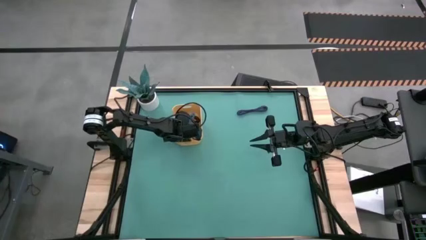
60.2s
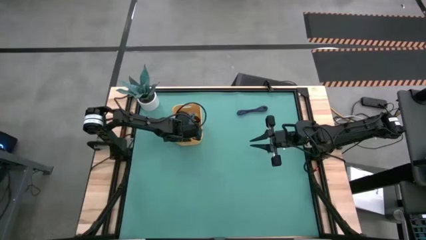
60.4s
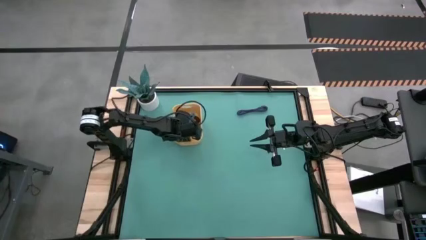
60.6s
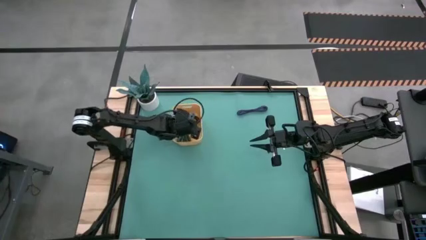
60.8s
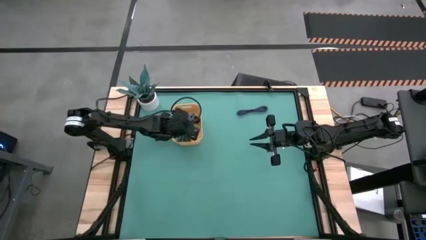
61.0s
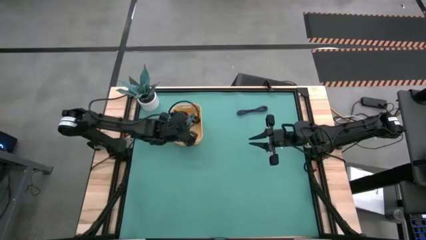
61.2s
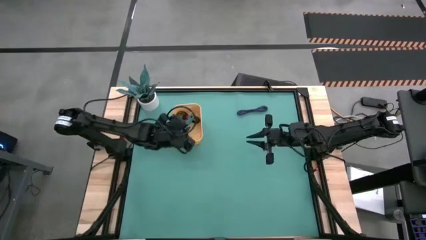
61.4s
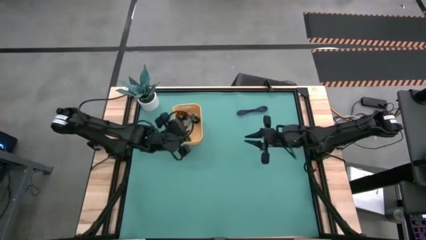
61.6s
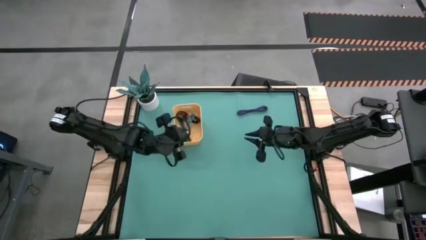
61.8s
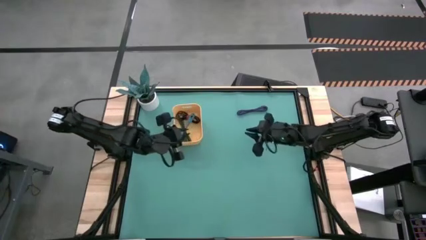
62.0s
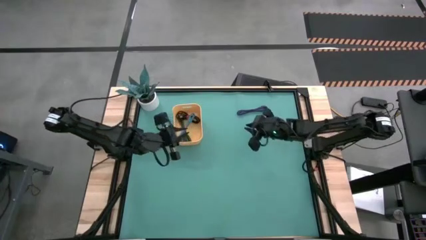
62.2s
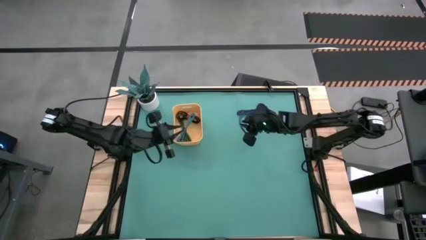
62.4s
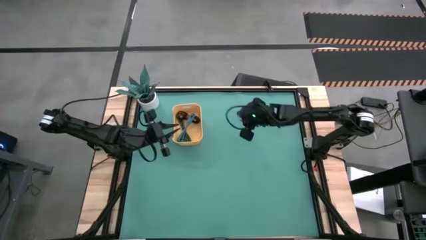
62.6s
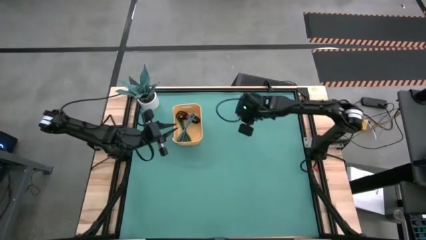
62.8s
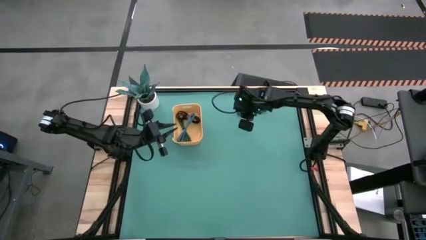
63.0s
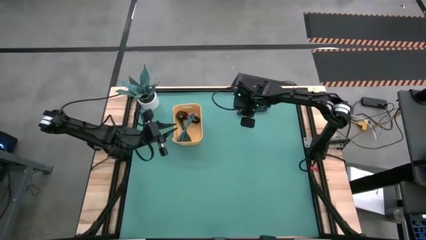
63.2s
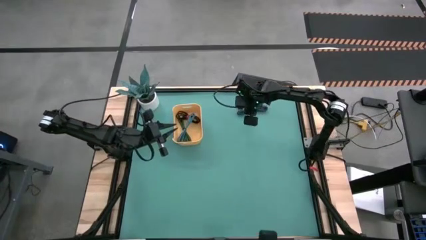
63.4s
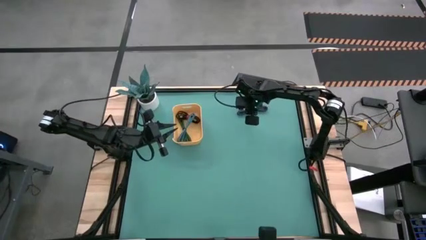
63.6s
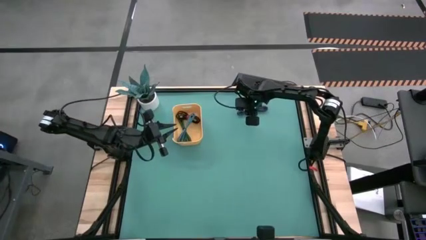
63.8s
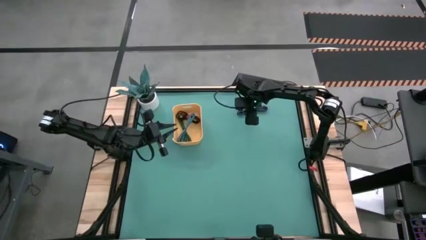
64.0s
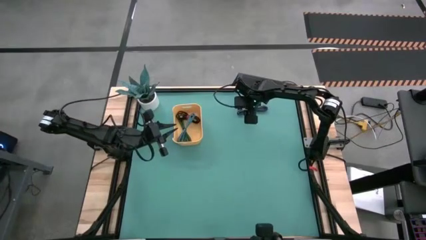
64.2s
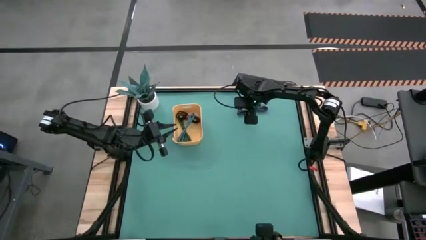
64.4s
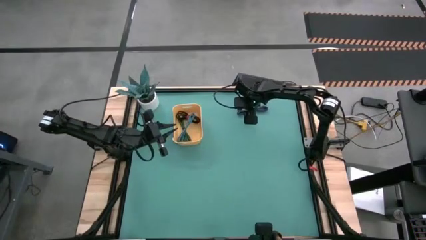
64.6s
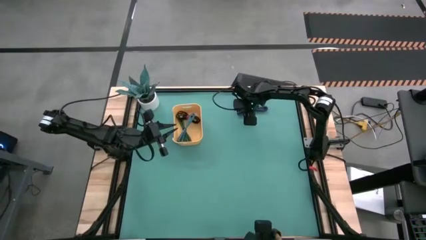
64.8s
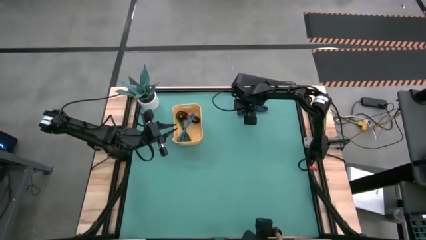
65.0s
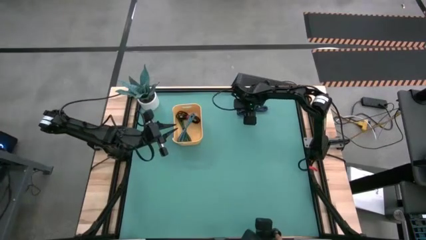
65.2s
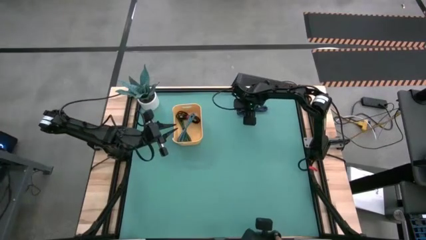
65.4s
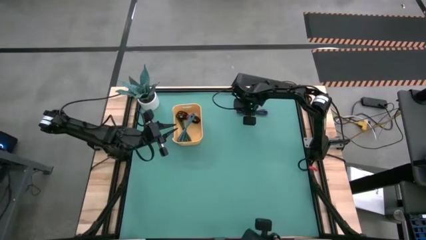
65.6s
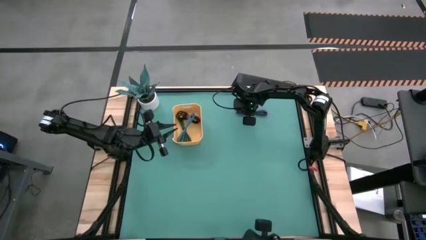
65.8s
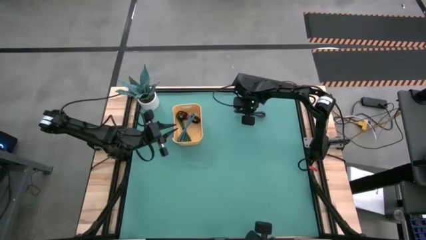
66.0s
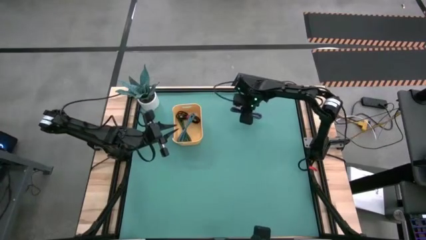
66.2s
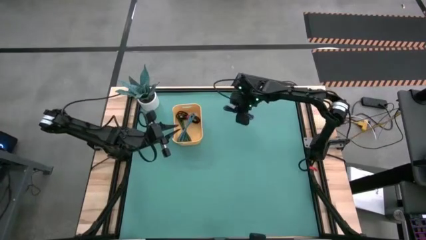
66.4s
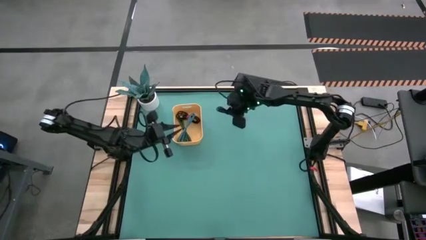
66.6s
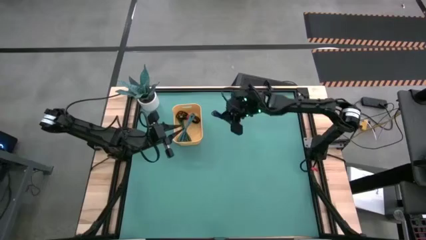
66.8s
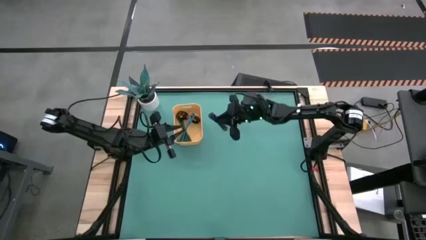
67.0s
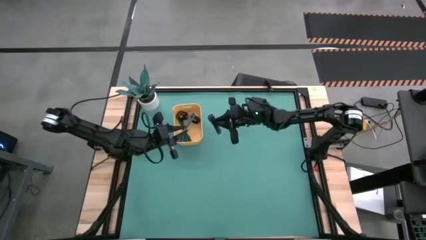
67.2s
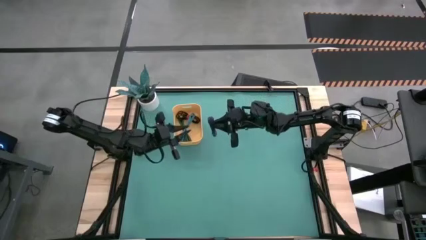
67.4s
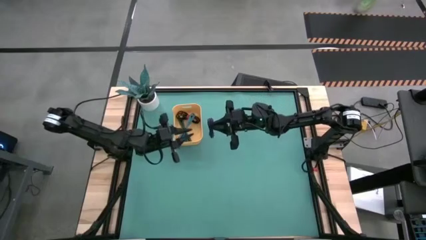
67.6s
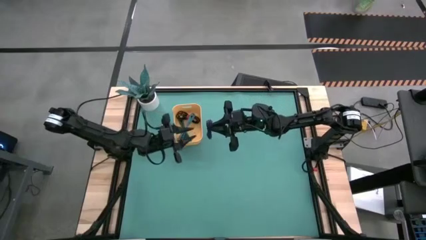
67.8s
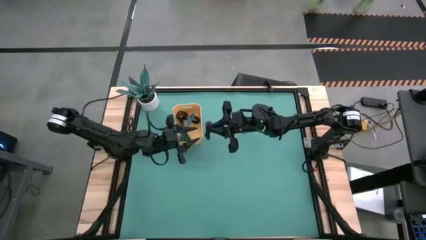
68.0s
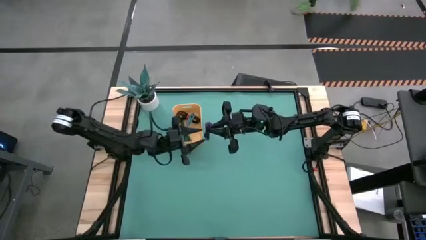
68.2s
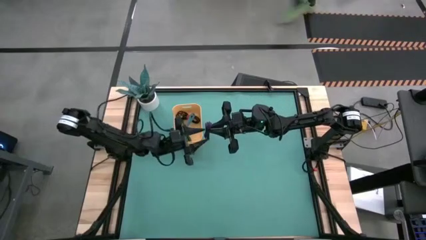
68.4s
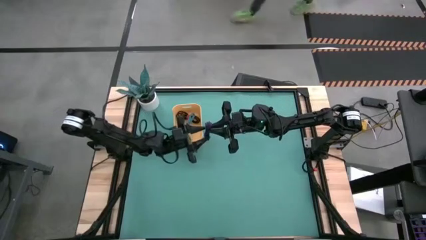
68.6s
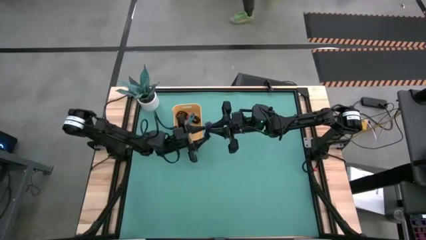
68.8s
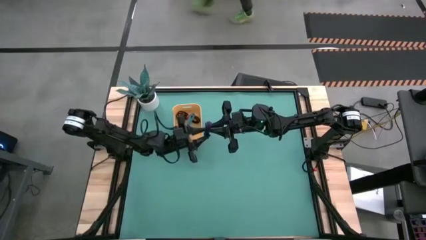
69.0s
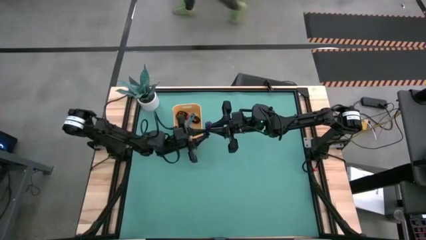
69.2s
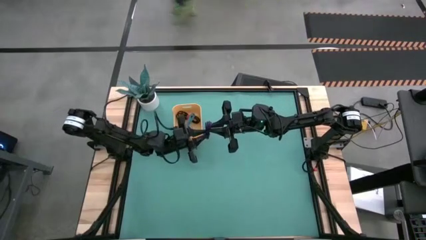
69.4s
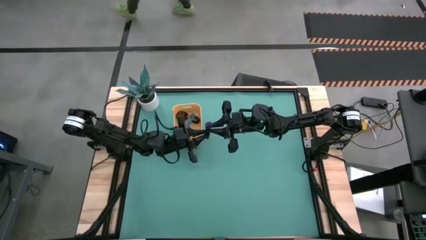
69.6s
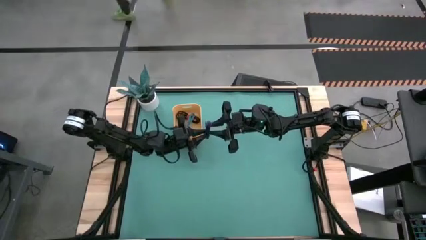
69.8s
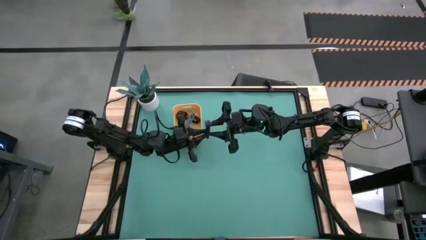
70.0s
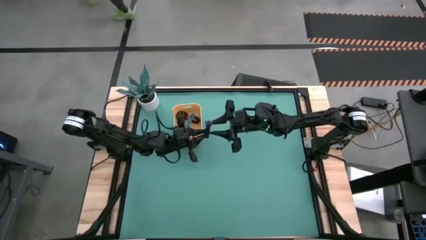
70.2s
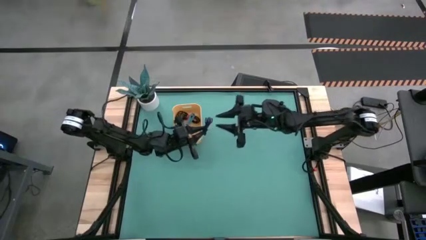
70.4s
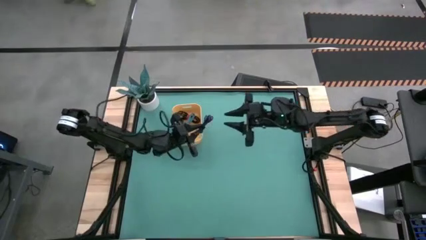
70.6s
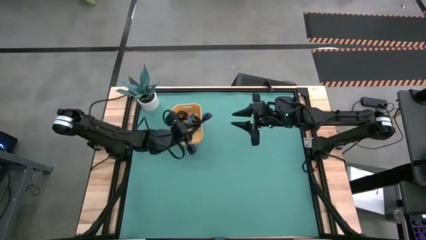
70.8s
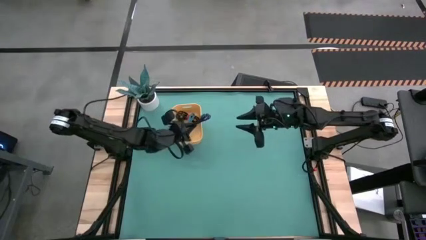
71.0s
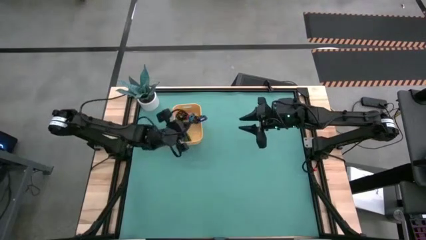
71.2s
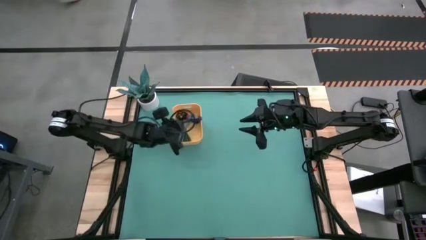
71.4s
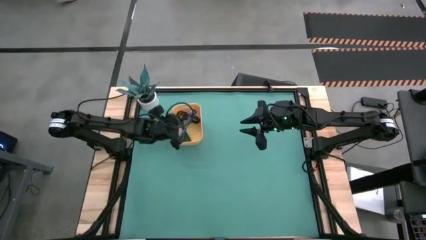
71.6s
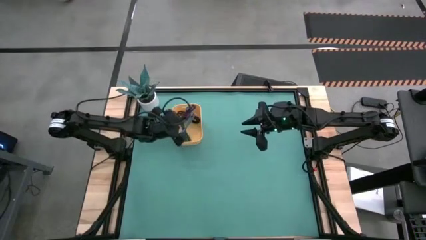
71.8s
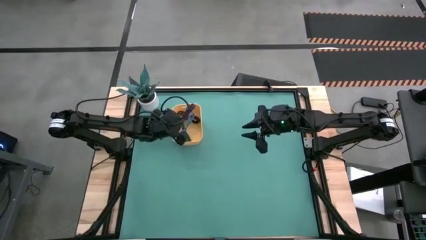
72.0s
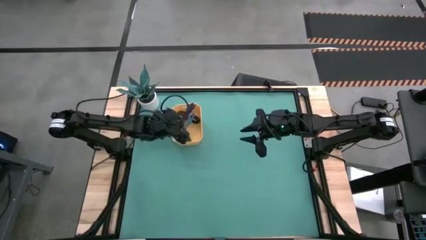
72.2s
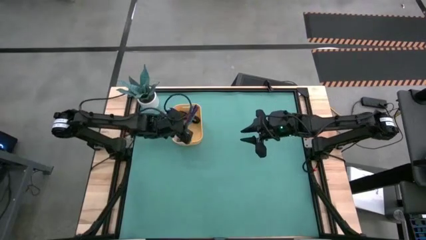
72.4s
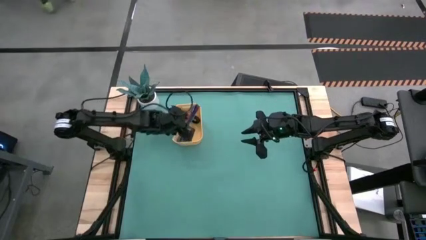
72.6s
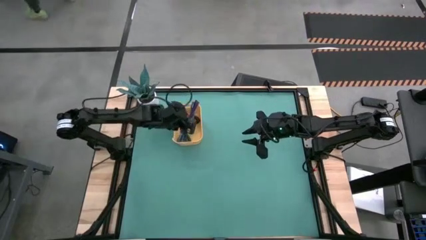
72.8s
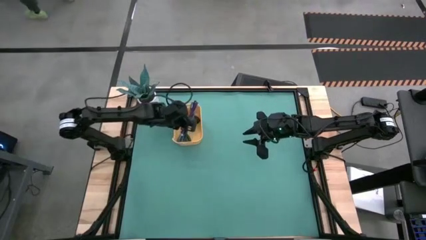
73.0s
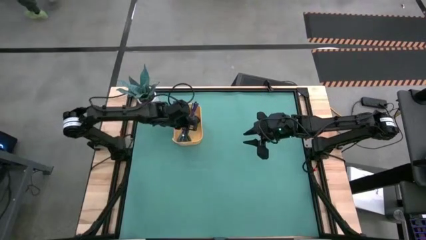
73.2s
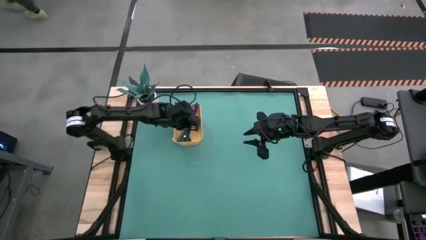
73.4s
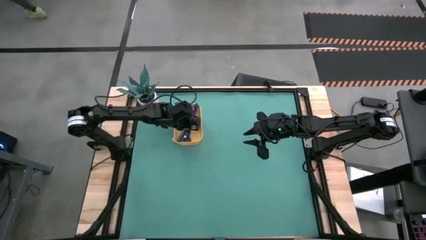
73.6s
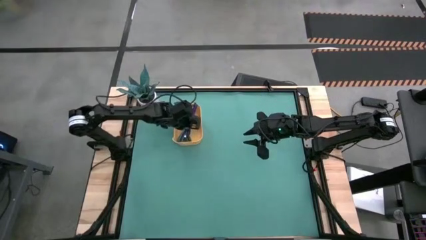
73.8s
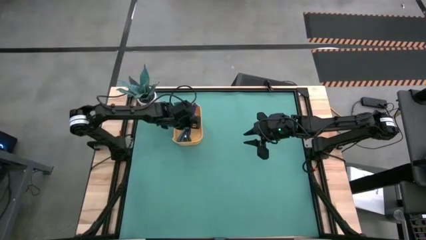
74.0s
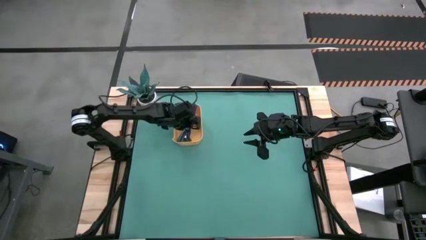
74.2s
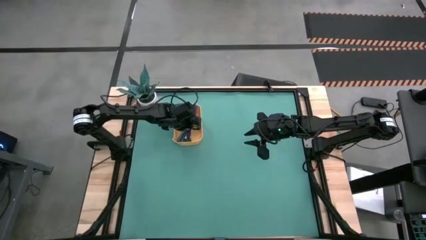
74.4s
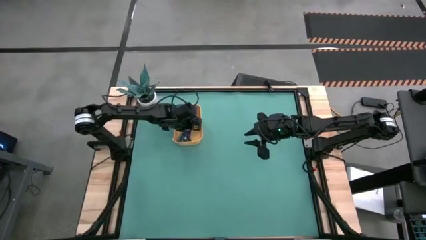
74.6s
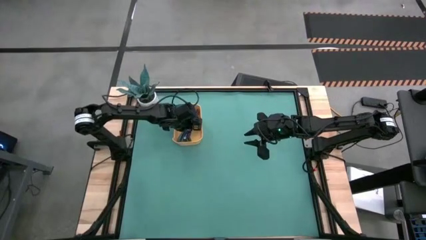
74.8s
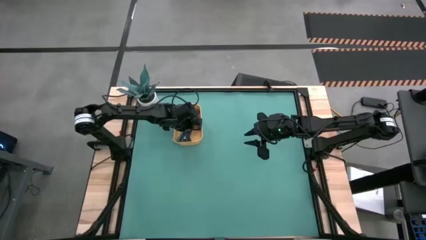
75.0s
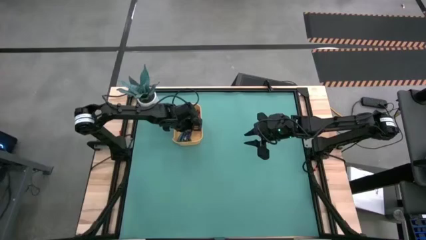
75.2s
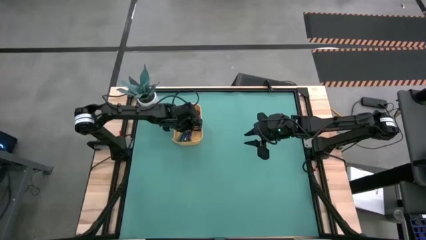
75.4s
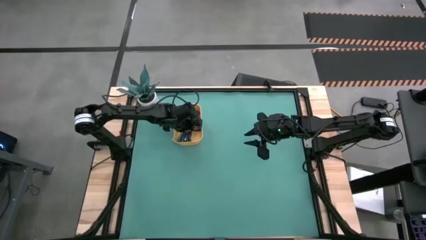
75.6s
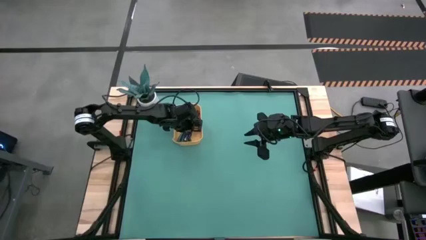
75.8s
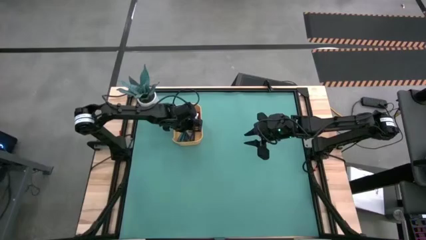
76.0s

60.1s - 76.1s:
Task: Pick and place USB-C Cables
Put the purple USB cable into the yellow bin
